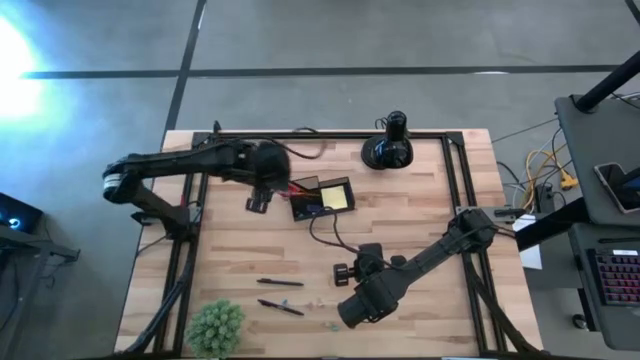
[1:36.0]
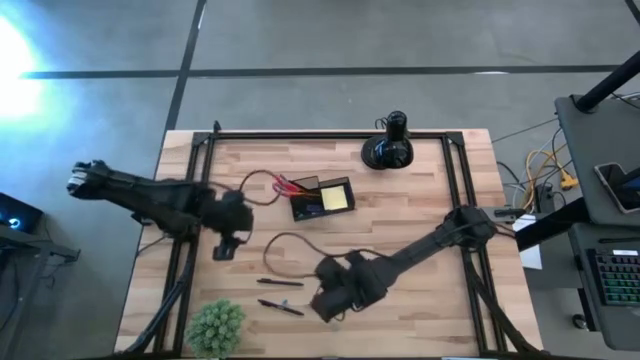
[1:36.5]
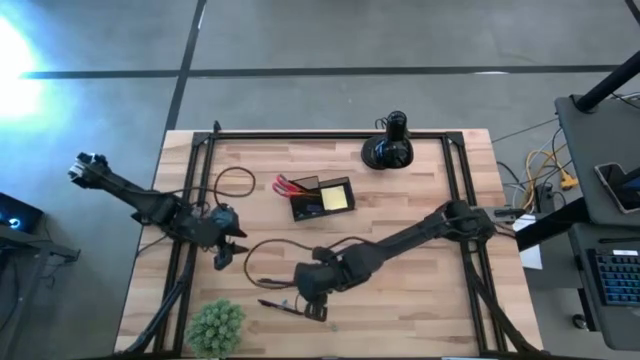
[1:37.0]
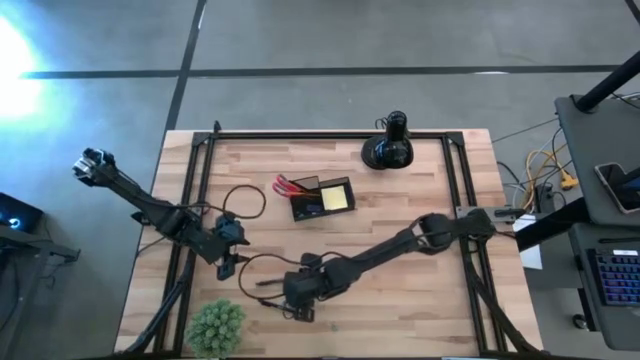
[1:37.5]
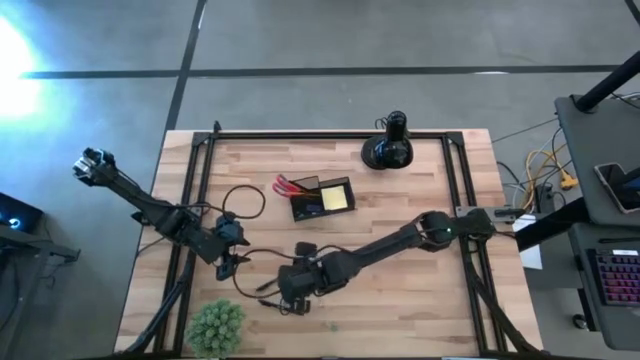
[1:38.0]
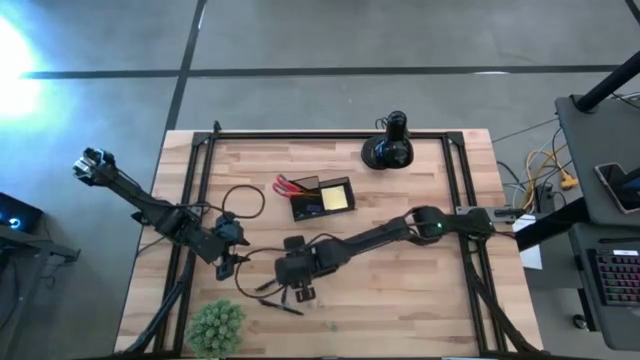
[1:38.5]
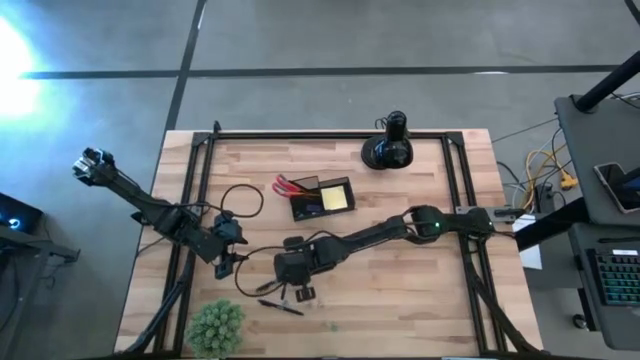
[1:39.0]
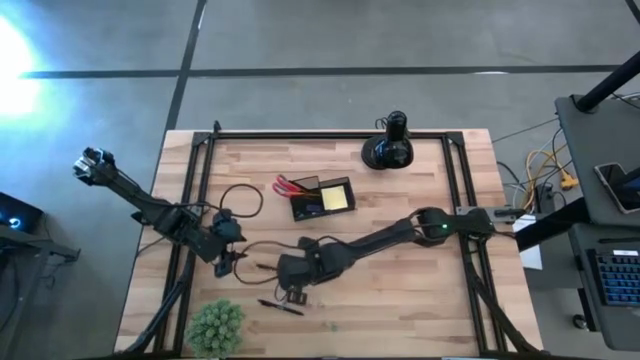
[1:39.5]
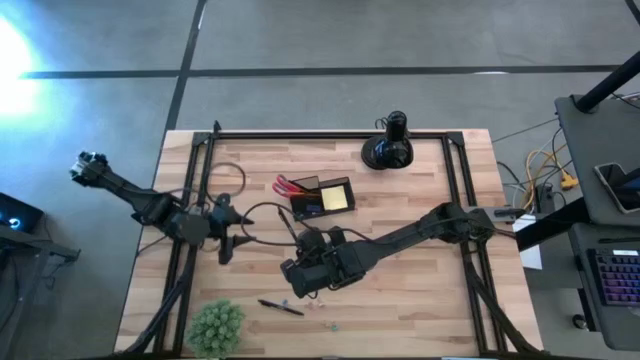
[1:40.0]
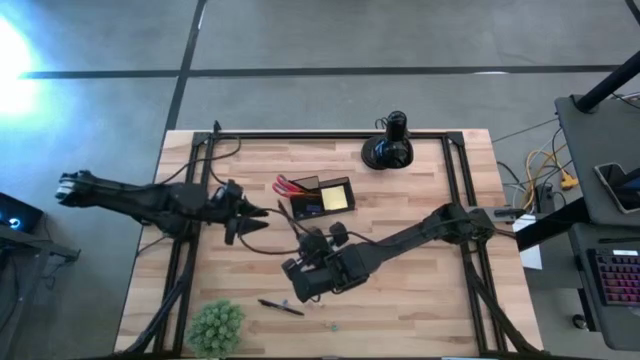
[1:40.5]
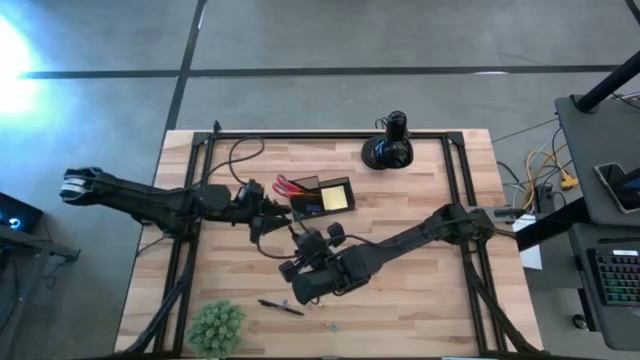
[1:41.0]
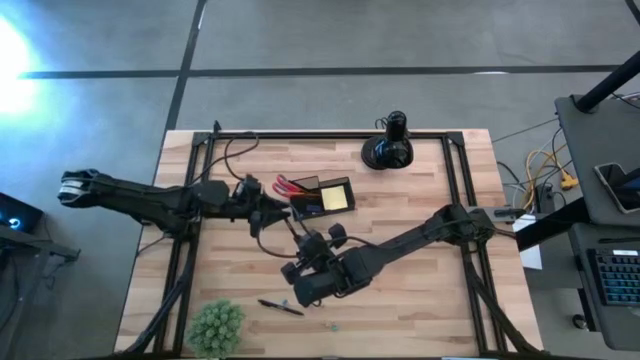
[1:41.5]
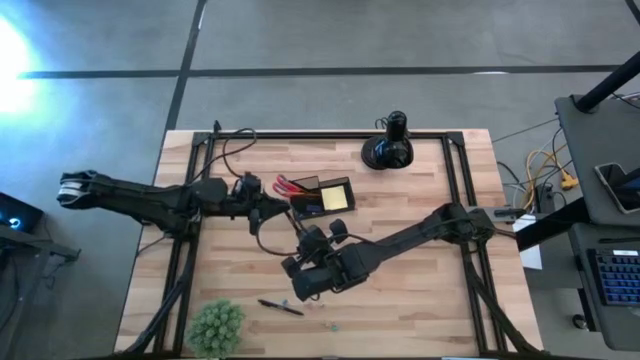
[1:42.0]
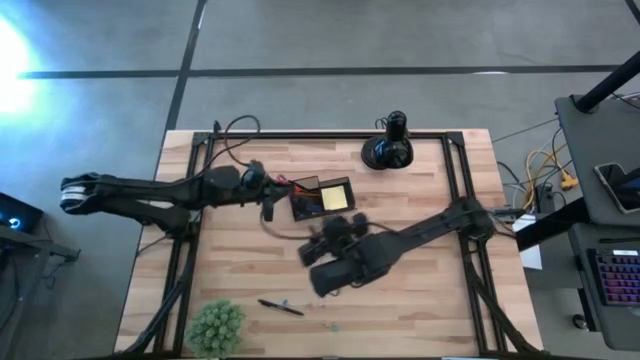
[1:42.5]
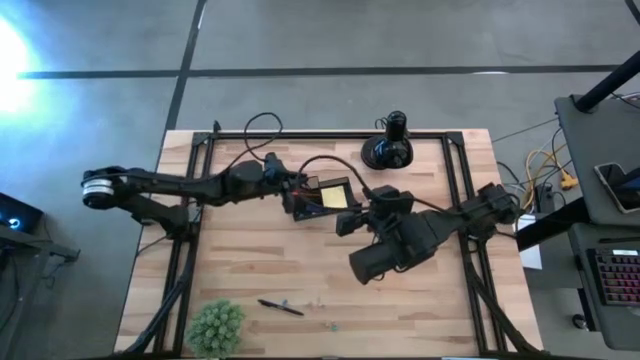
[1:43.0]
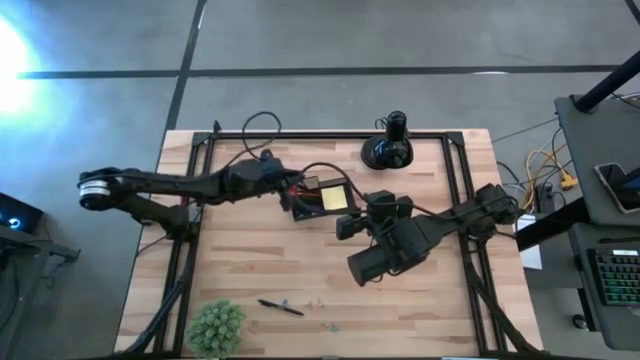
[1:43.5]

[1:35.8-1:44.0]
Task: Pick and place office supplies into organizer
Put the top pen into the black organizer

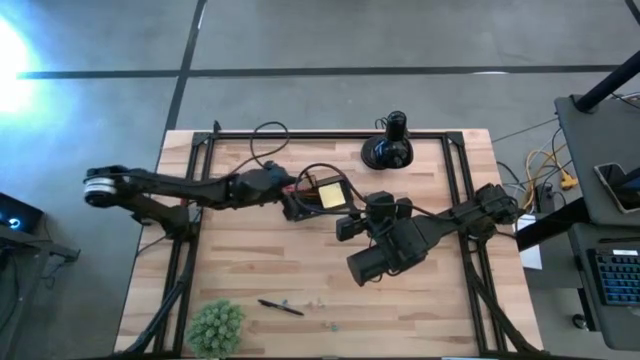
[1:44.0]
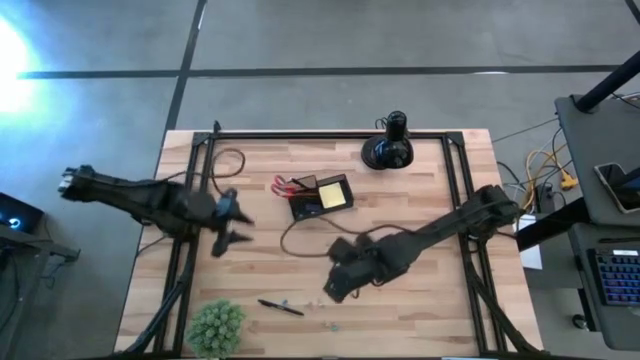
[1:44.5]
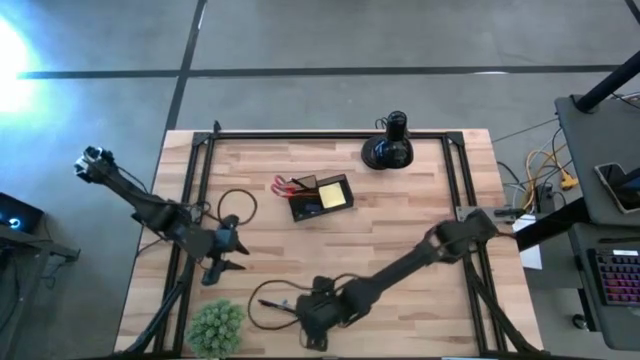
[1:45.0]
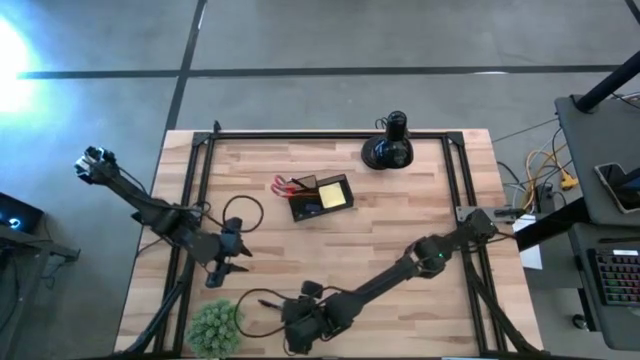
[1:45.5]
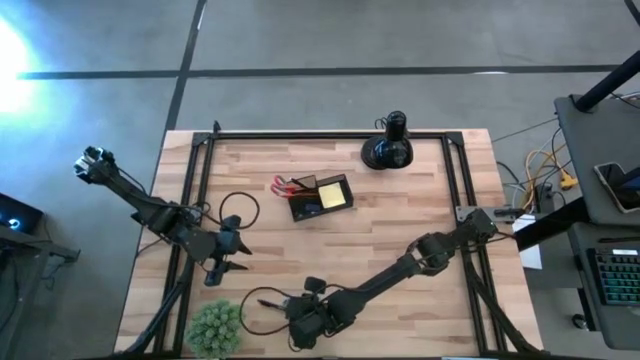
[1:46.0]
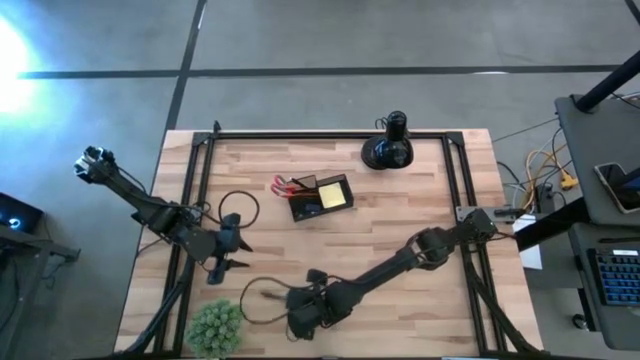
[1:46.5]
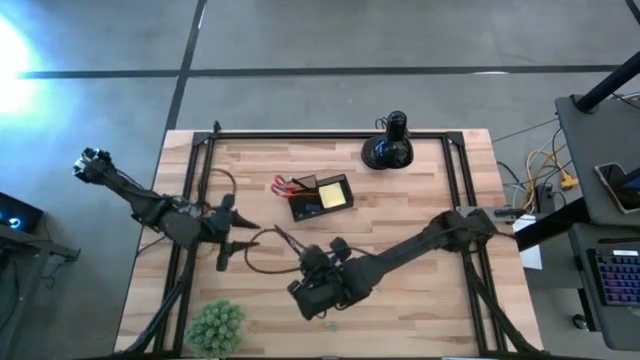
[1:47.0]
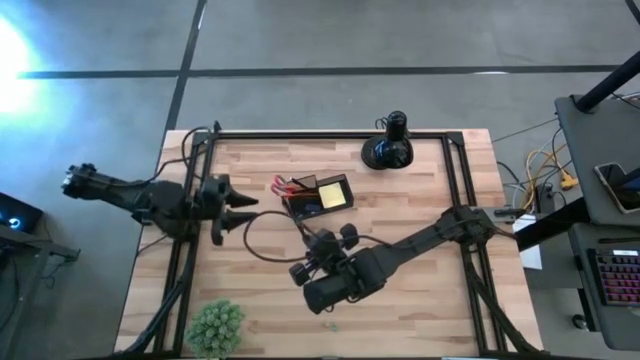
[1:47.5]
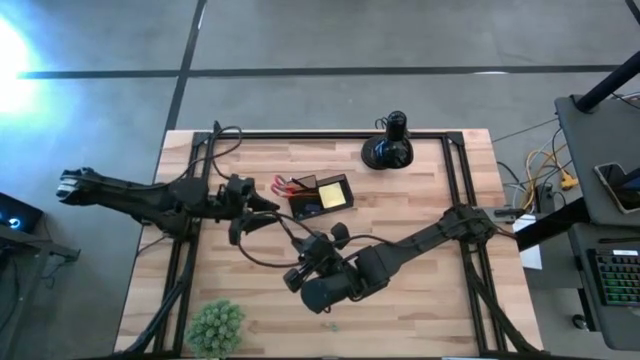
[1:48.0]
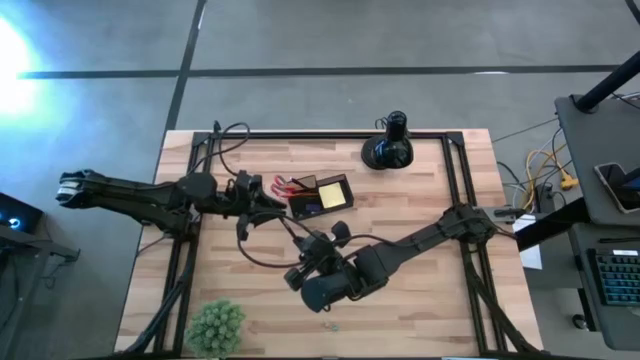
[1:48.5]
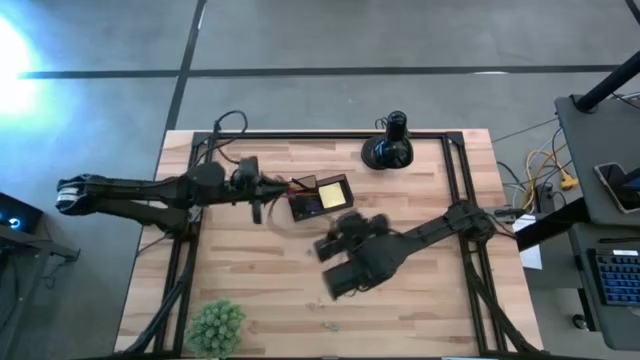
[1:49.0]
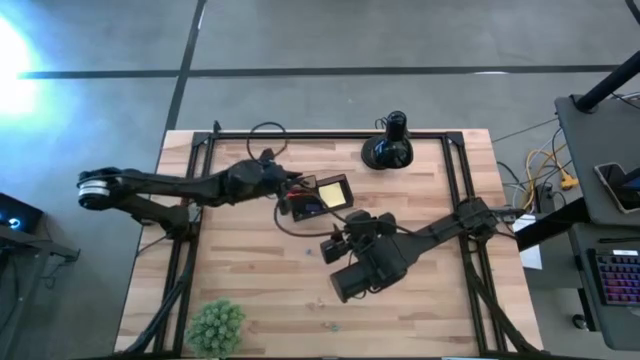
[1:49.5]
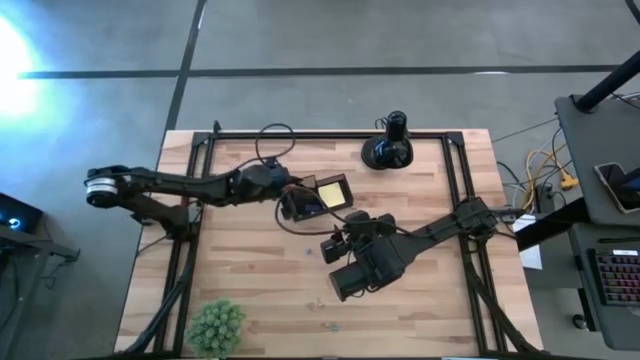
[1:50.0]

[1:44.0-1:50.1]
Put the pen into the black organizer

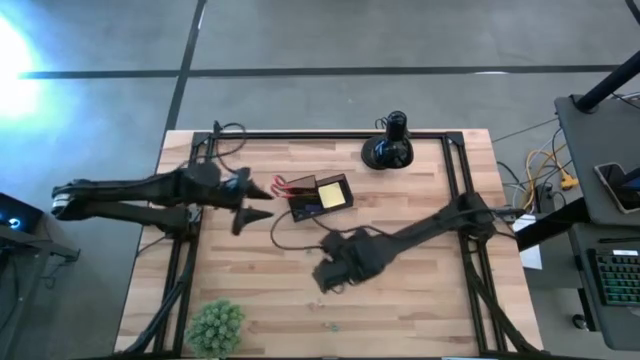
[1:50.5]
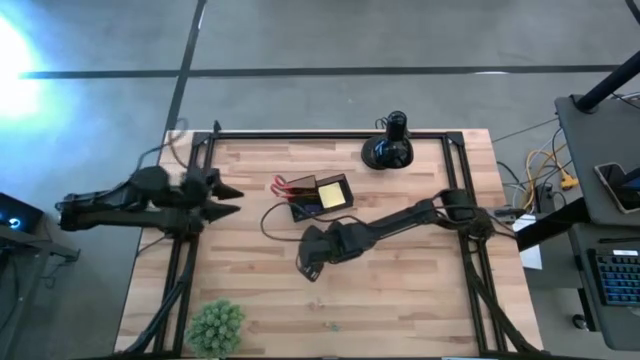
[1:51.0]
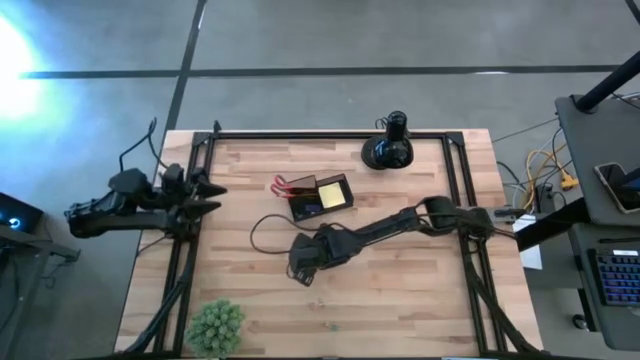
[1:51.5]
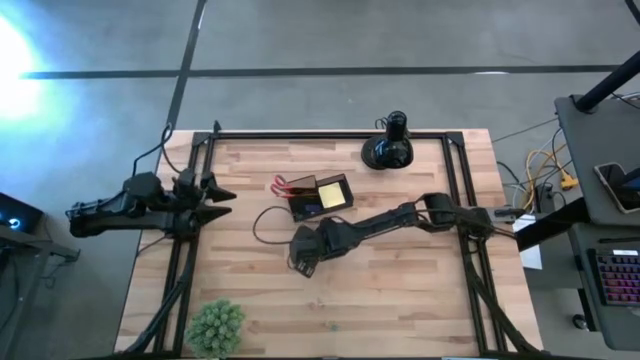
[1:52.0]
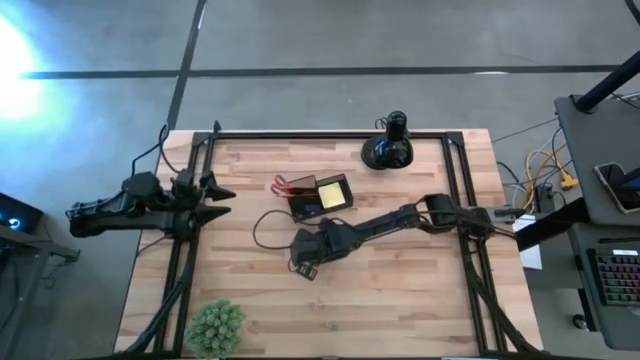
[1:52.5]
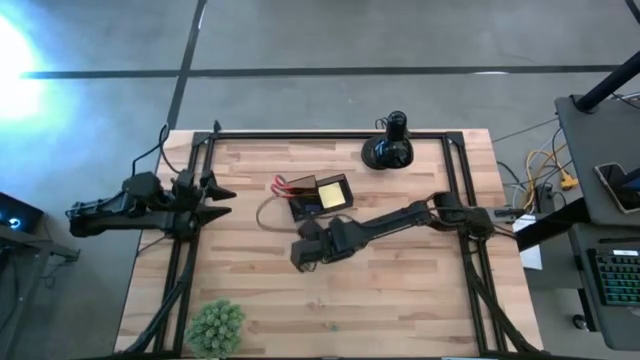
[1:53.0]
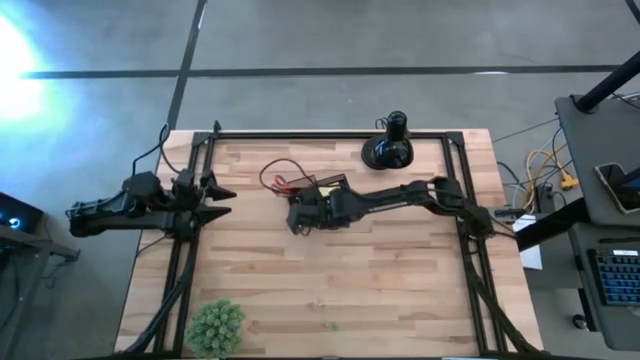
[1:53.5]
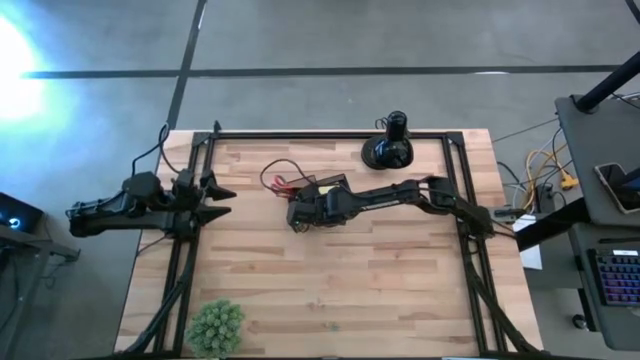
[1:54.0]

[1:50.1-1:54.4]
Put the top blue clip into the black organizer

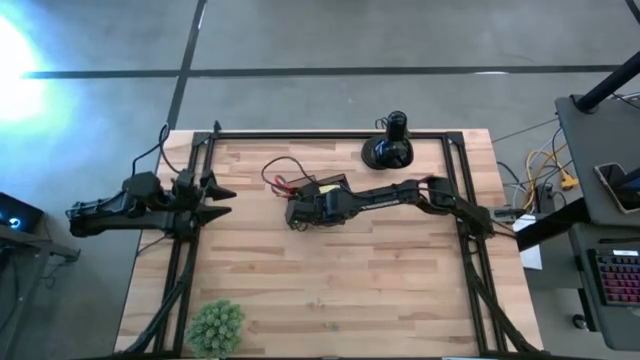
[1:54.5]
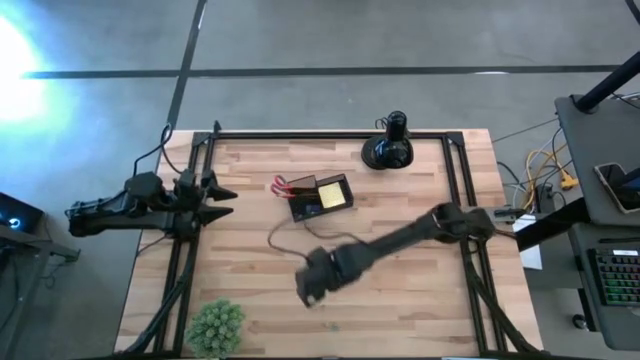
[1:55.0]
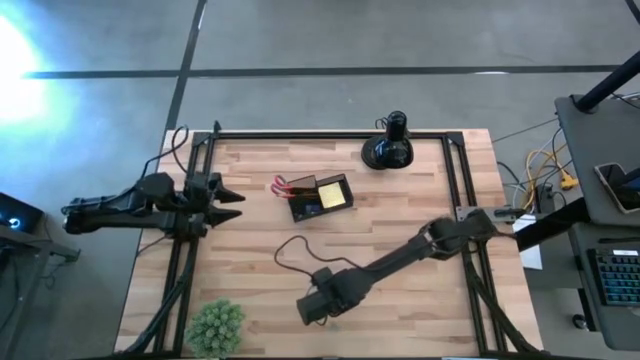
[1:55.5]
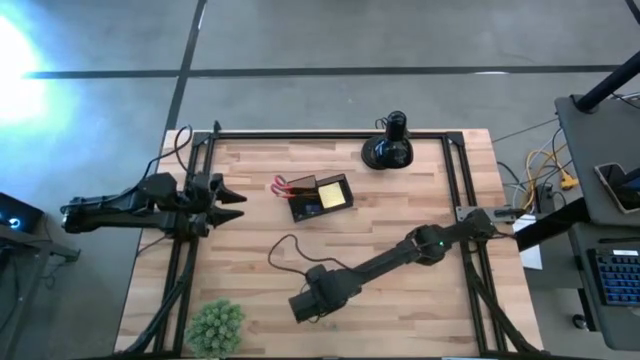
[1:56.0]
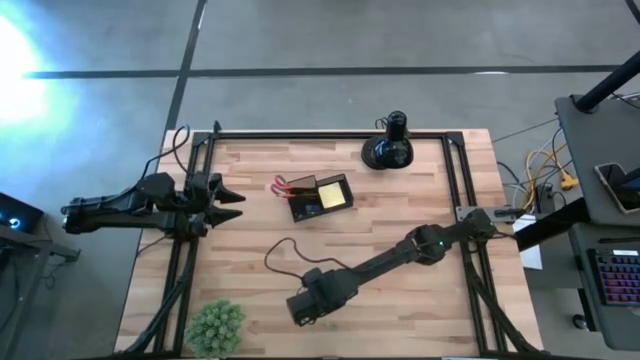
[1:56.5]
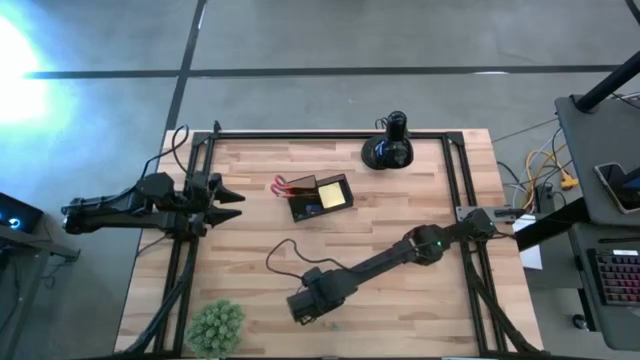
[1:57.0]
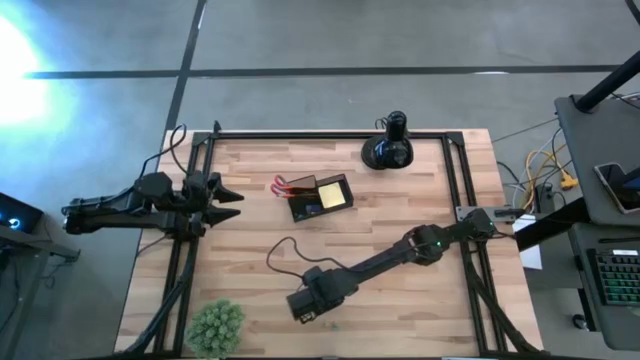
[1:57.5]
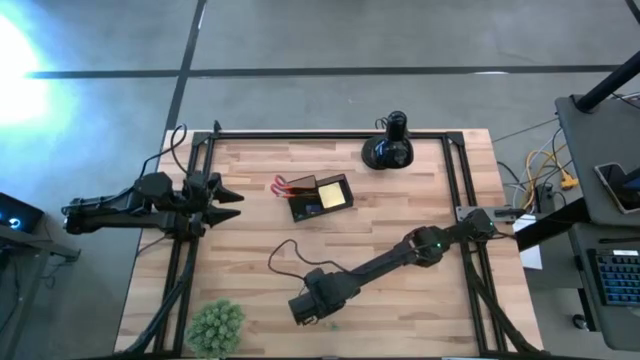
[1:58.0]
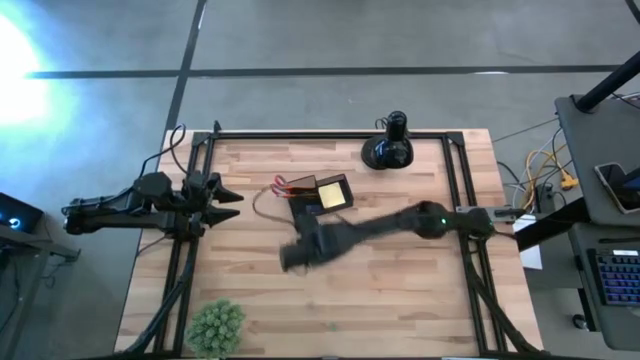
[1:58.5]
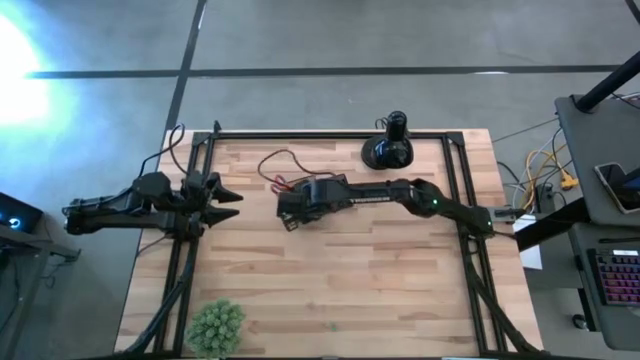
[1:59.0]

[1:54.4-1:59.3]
Put the top yellow clip into the black organizer
